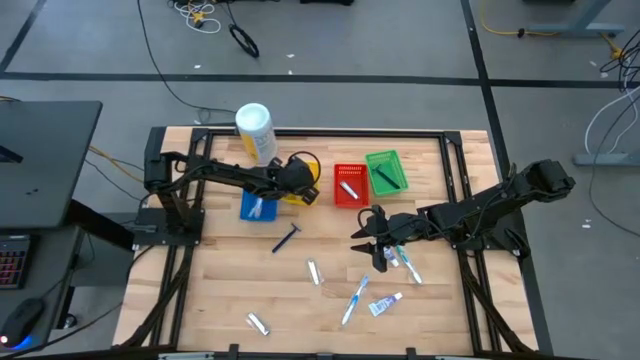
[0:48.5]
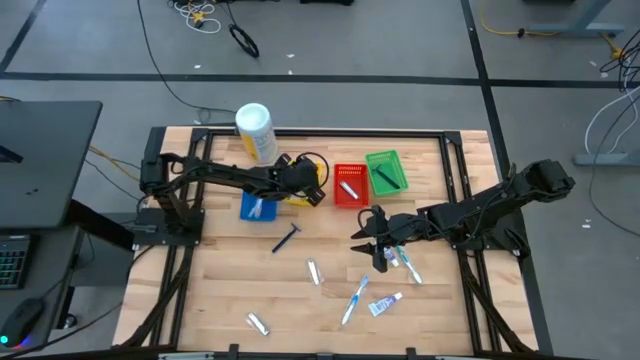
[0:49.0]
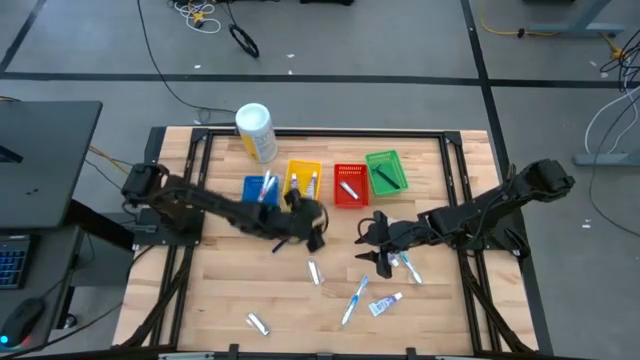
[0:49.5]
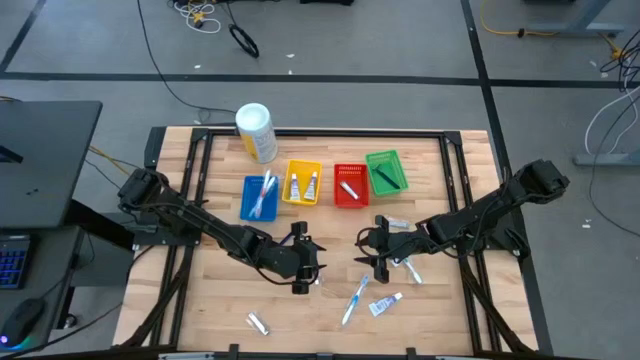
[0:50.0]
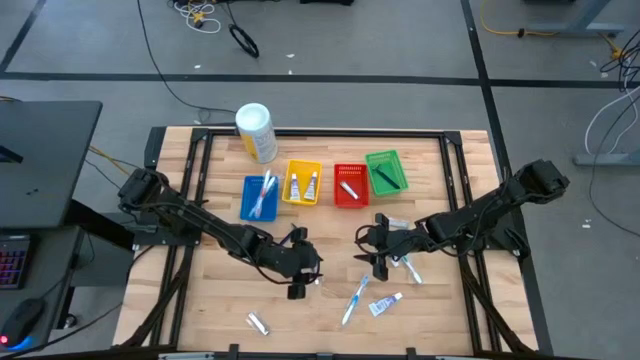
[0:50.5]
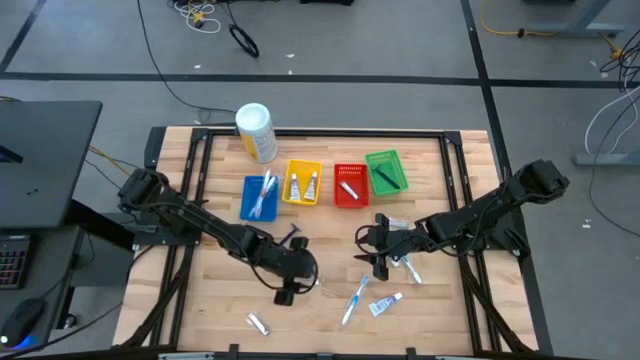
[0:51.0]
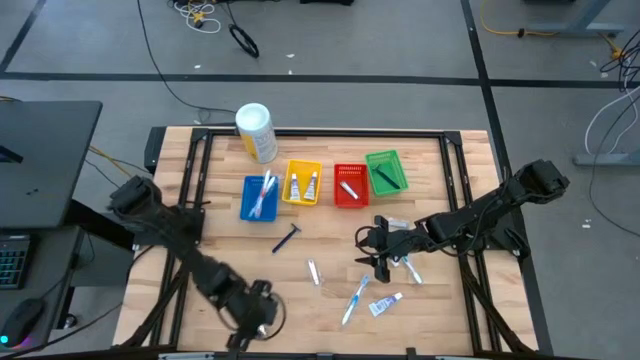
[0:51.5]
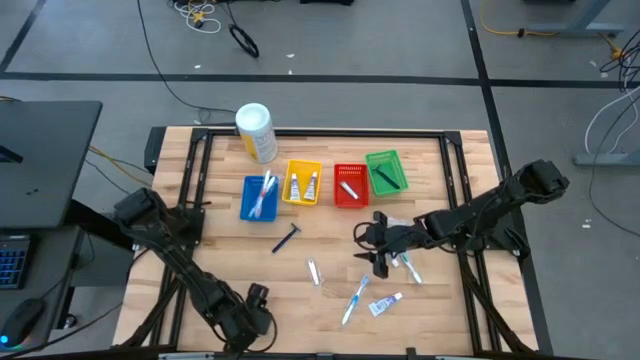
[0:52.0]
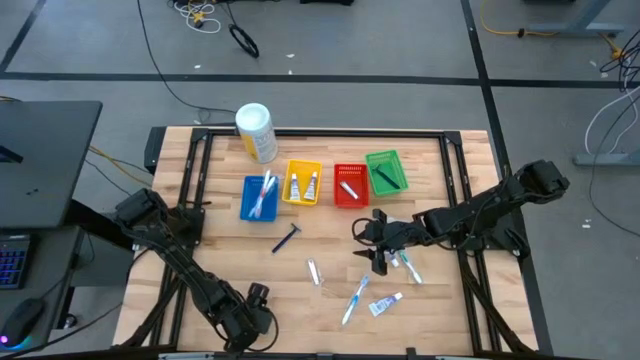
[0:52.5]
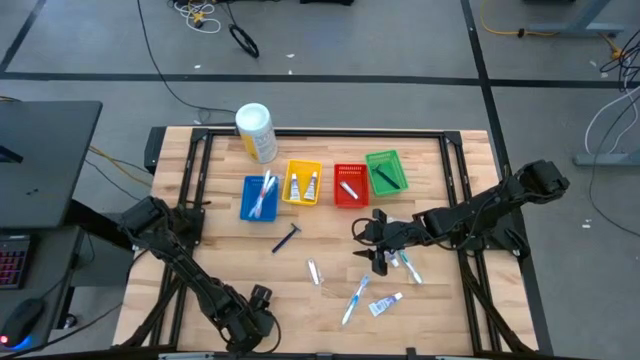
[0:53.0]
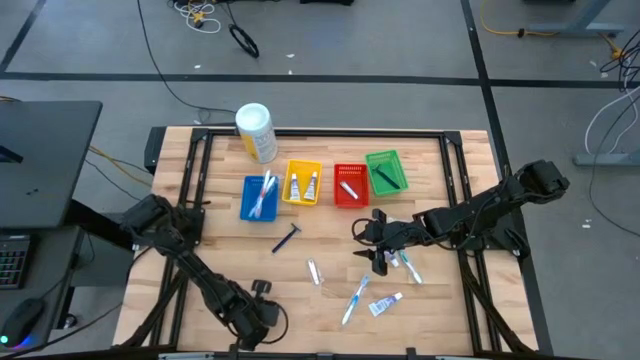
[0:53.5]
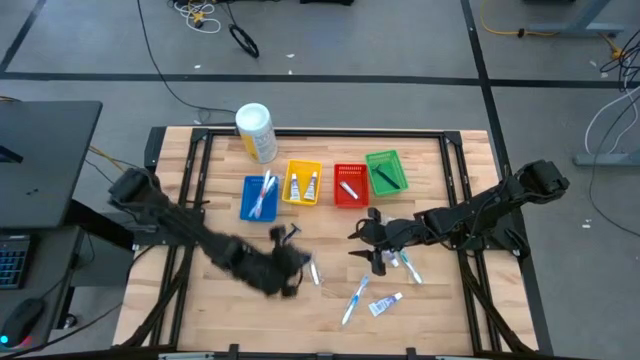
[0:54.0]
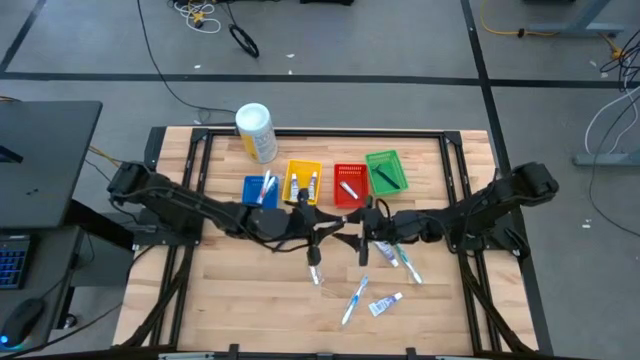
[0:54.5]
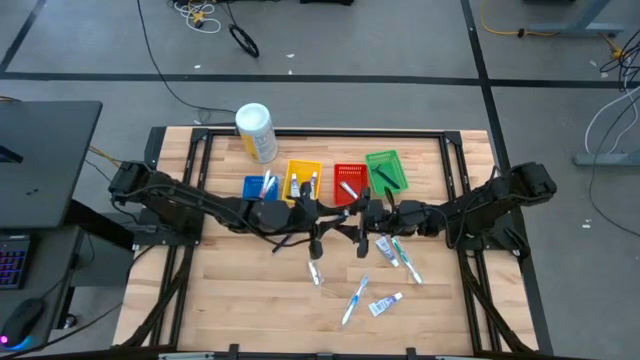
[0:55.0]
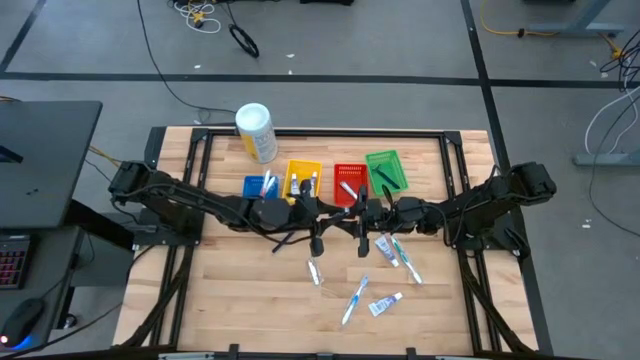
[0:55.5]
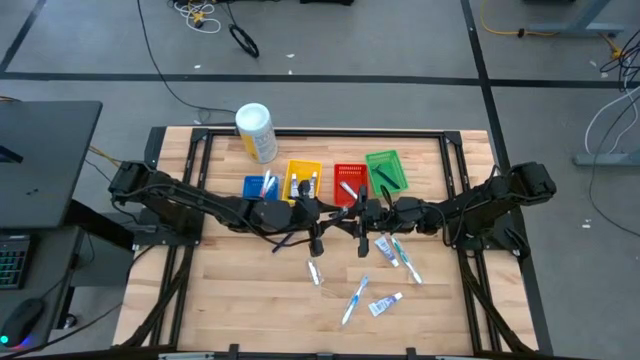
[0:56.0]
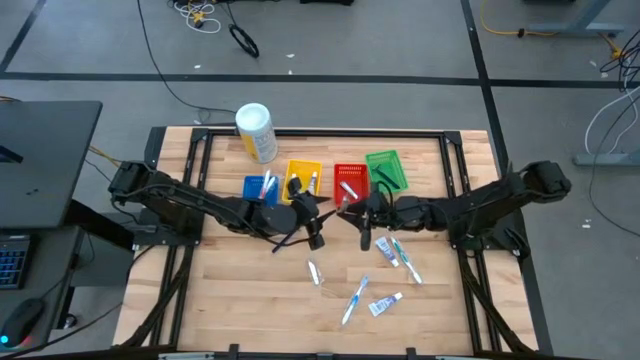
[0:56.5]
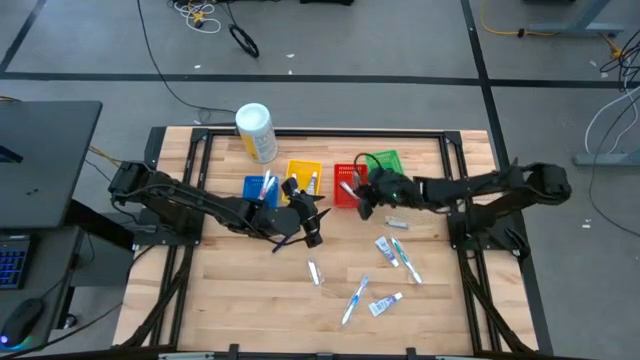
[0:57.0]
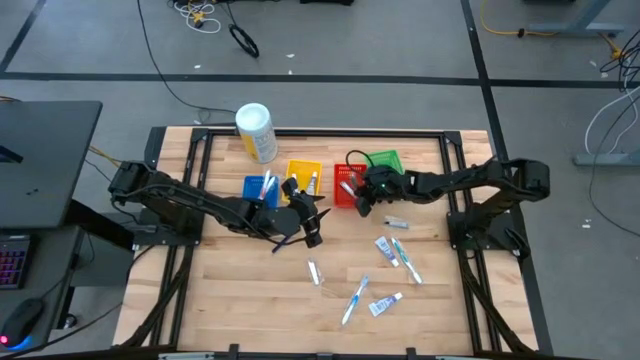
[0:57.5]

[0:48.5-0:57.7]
Task: Pick & Place Travel size toiletries
Put the silver nail cutter into the red bin

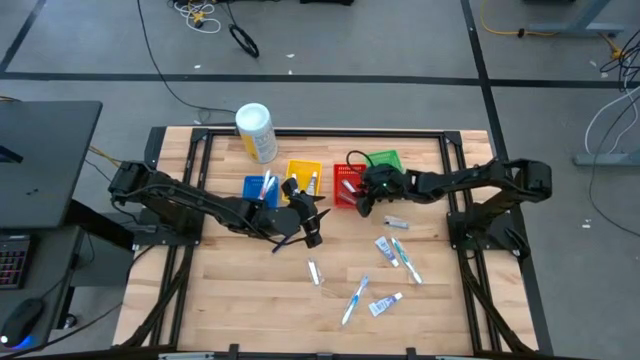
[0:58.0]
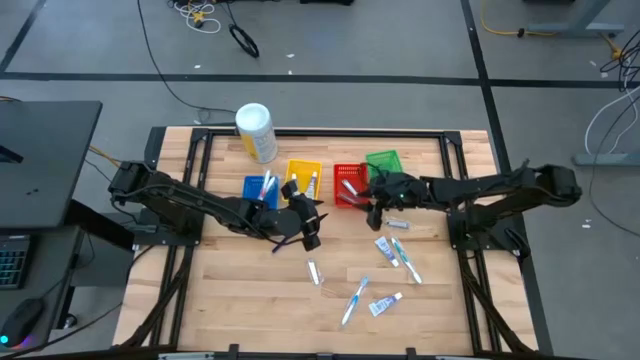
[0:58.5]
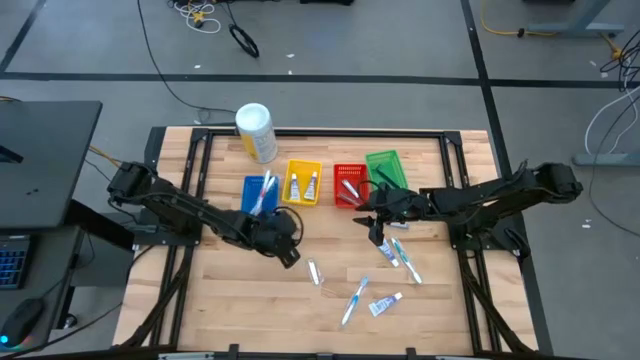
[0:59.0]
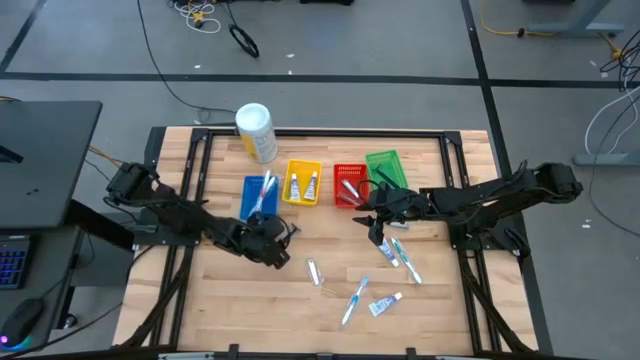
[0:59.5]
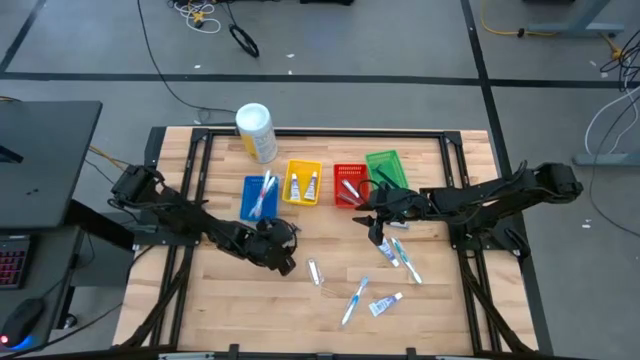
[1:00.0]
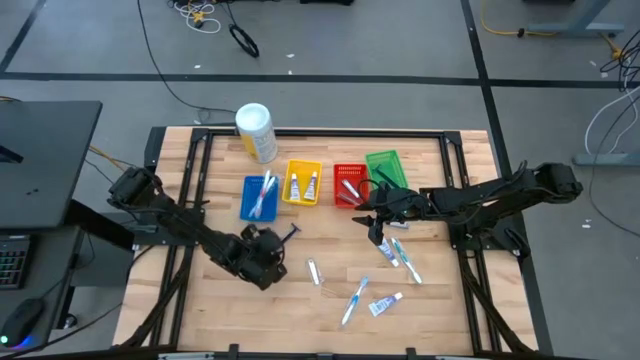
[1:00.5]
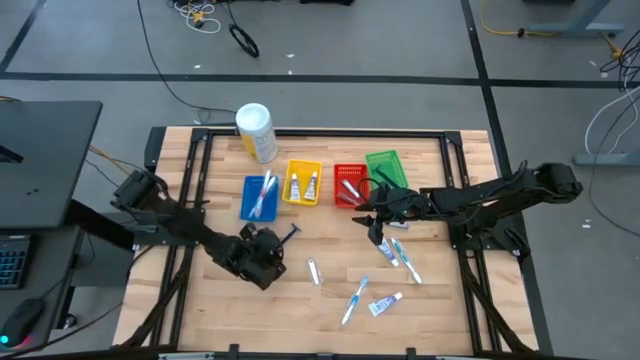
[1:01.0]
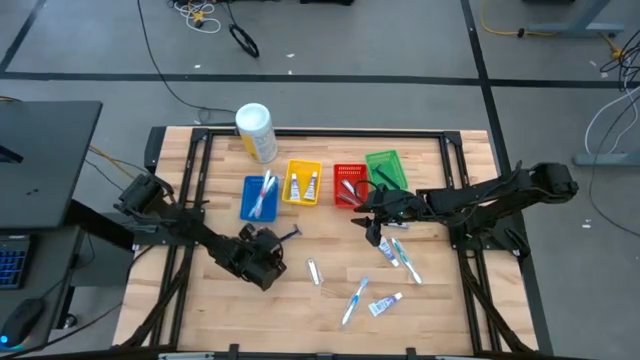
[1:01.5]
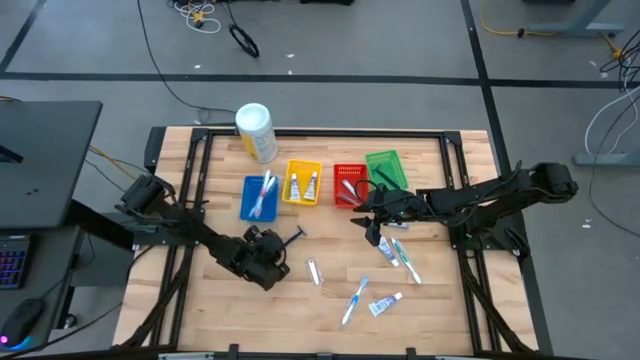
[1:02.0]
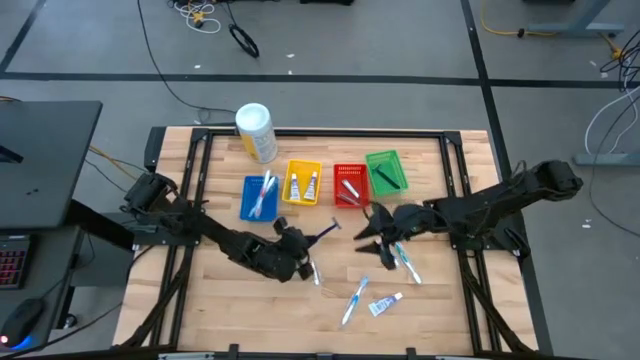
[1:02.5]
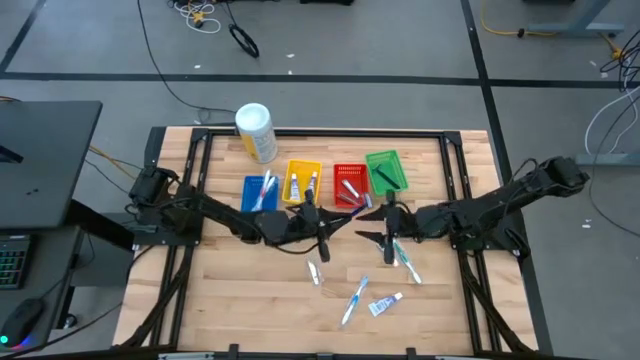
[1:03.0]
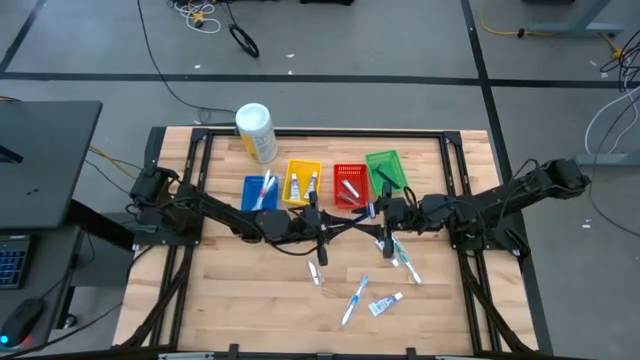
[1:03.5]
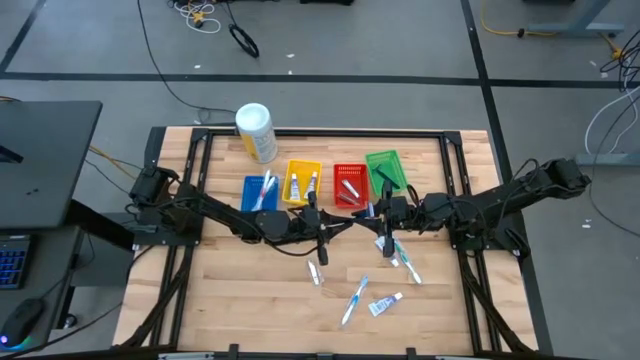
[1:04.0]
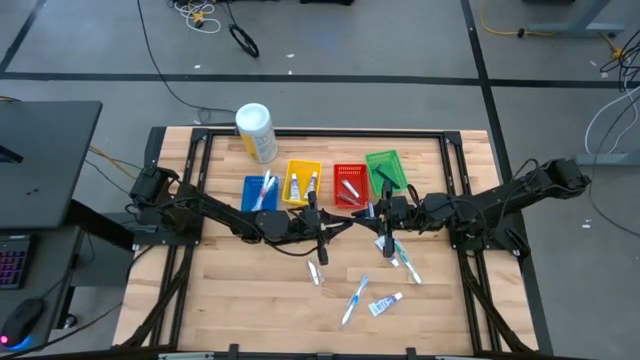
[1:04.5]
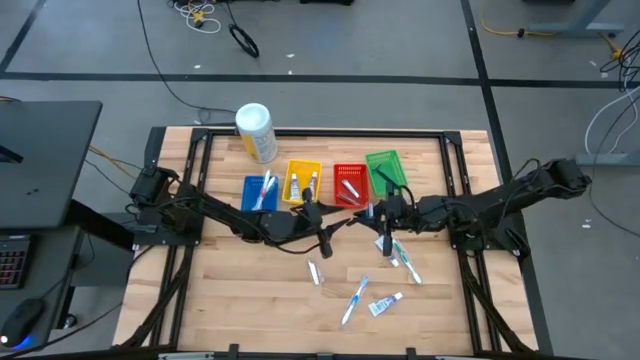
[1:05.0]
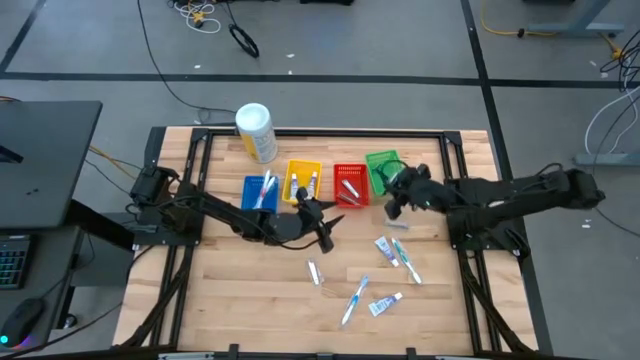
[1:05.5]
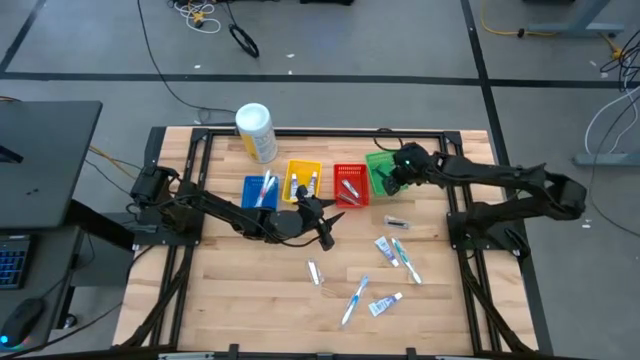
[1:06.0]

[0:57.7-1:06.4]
Put the blue razor into the green bin

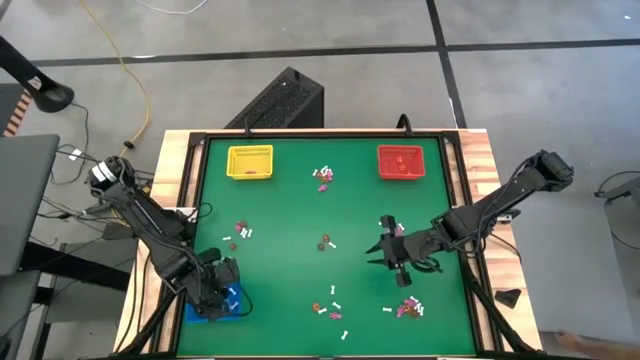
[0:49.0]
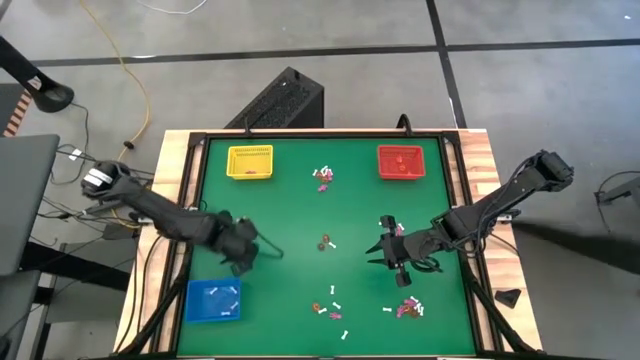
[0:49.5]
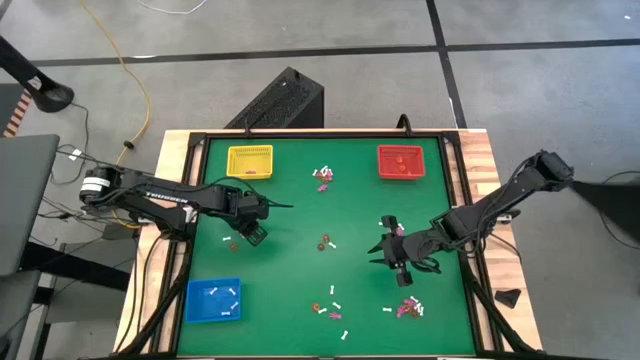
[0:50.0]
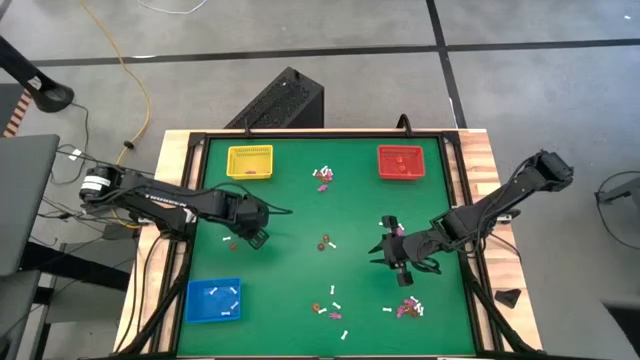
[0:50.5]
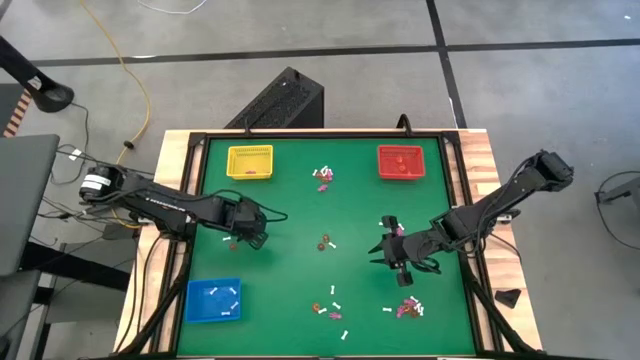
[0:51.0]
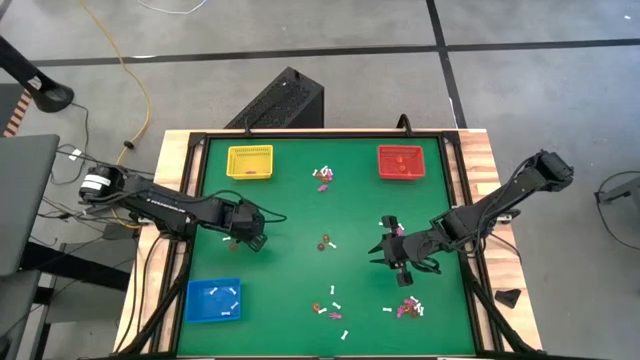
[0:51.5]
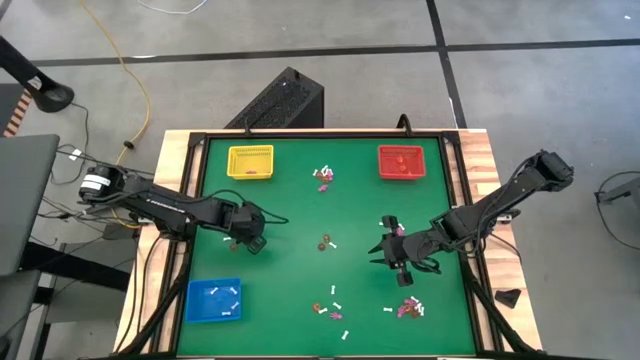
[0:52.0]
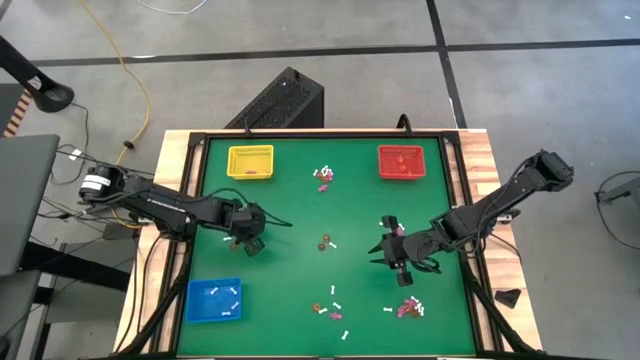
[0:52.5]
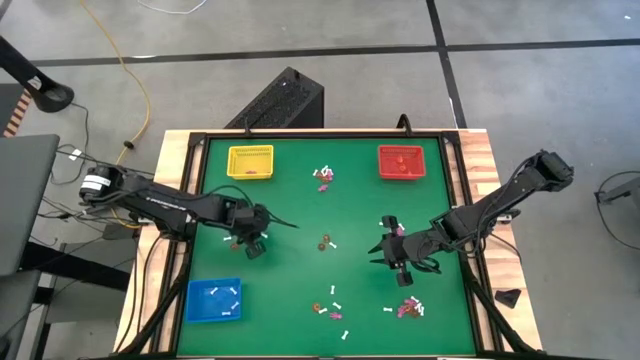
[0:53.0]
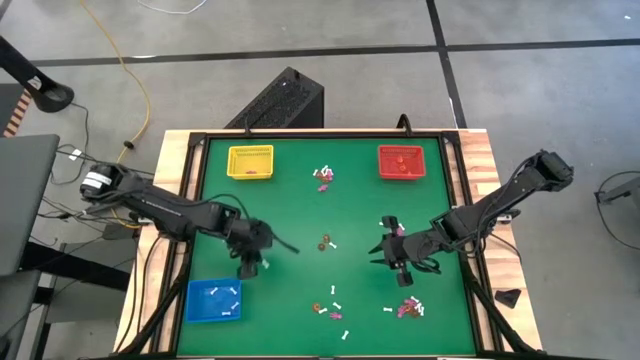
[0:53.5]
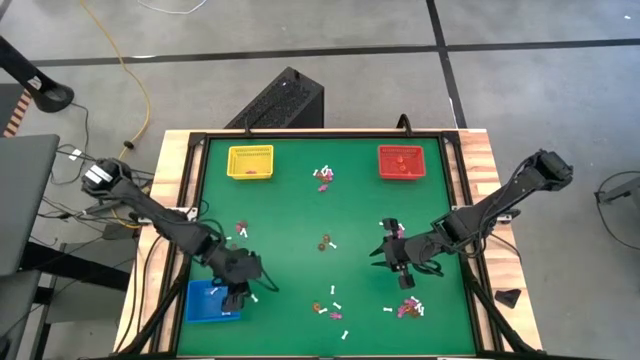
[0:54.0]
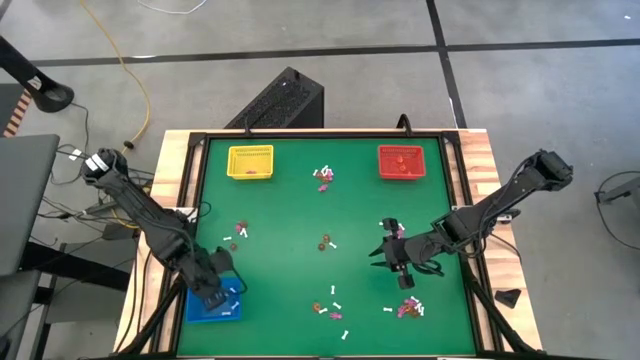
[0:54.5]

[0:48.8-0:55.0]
Task: Sort Halloween decoration
Put the white bone toy into the blue bin
